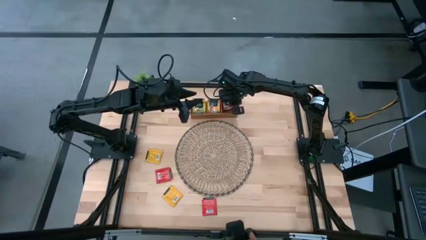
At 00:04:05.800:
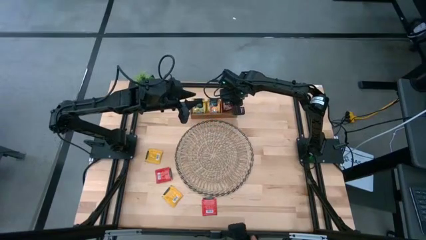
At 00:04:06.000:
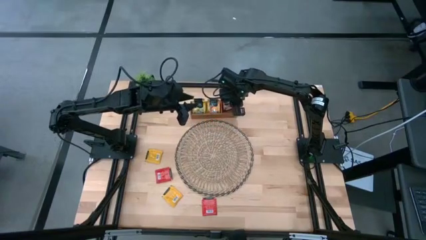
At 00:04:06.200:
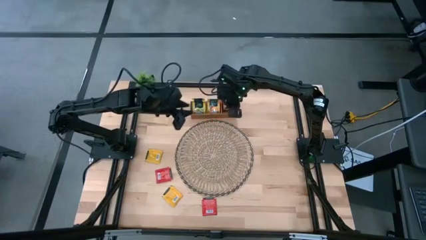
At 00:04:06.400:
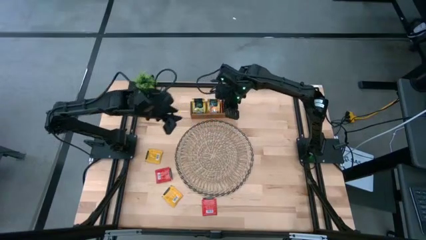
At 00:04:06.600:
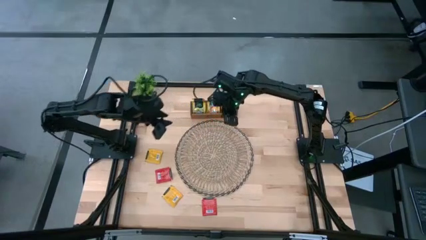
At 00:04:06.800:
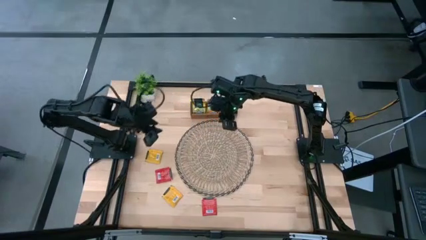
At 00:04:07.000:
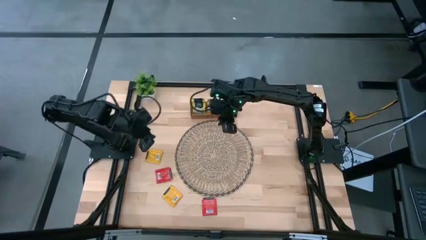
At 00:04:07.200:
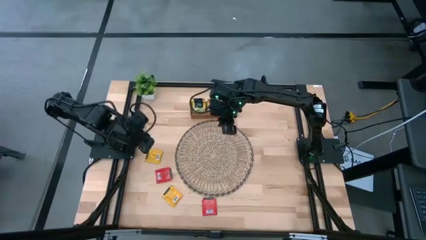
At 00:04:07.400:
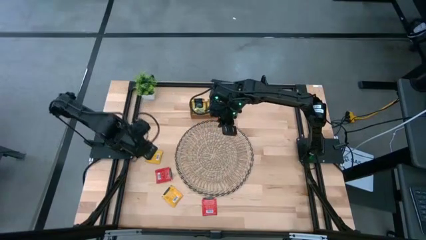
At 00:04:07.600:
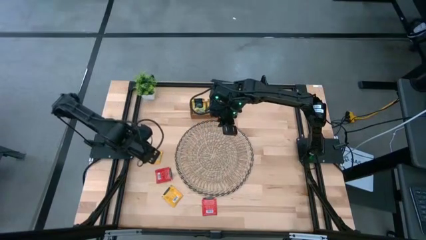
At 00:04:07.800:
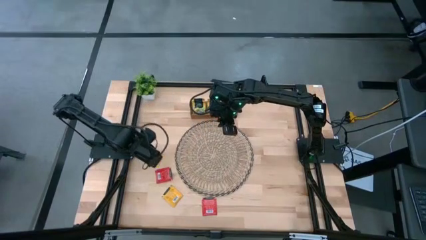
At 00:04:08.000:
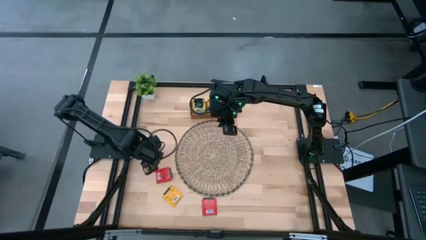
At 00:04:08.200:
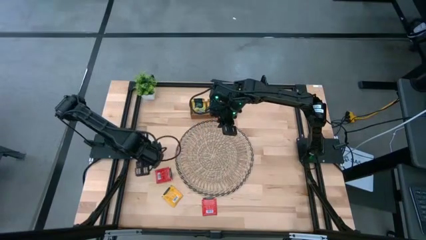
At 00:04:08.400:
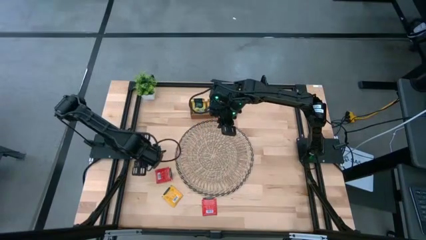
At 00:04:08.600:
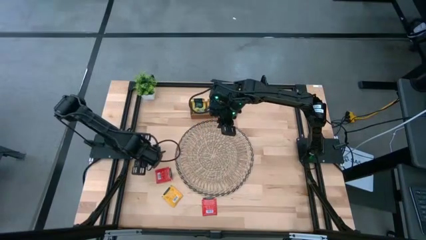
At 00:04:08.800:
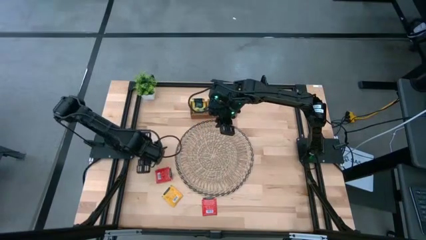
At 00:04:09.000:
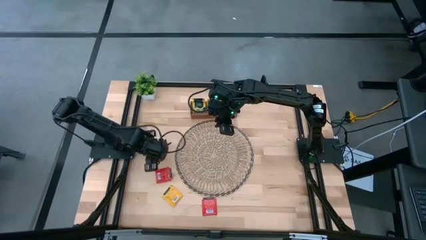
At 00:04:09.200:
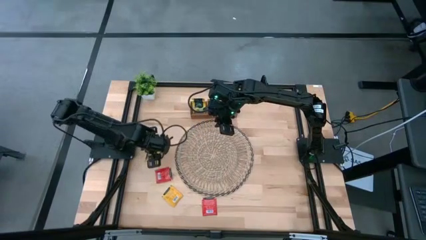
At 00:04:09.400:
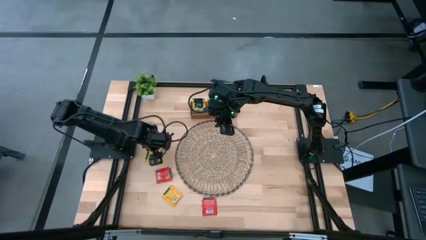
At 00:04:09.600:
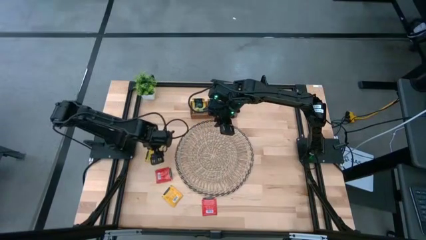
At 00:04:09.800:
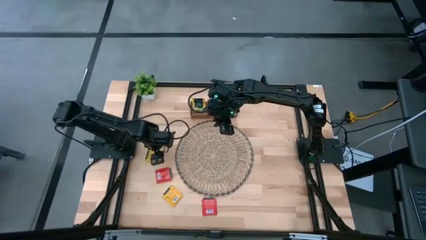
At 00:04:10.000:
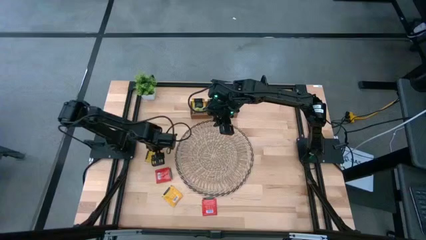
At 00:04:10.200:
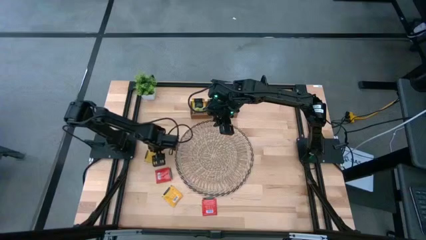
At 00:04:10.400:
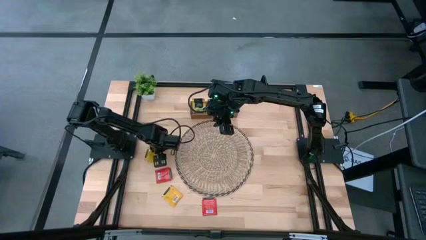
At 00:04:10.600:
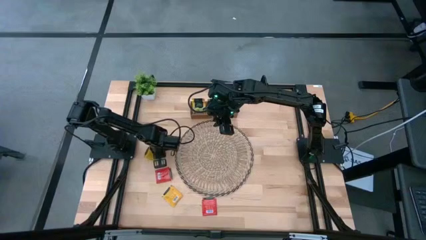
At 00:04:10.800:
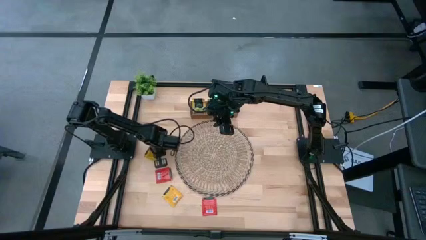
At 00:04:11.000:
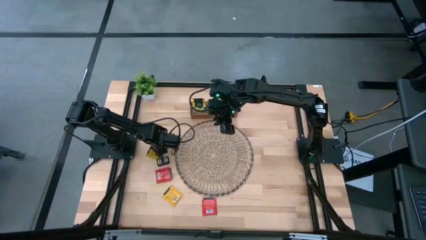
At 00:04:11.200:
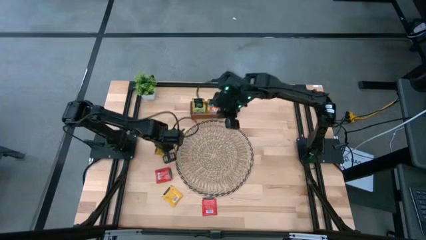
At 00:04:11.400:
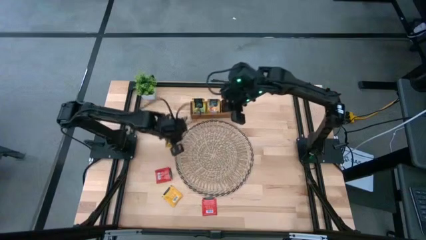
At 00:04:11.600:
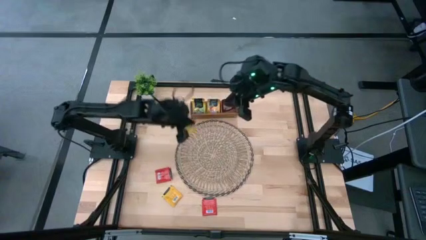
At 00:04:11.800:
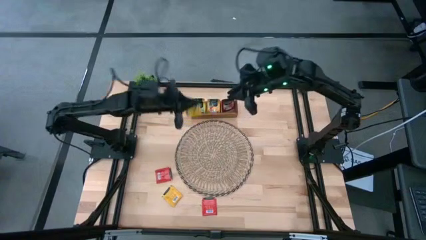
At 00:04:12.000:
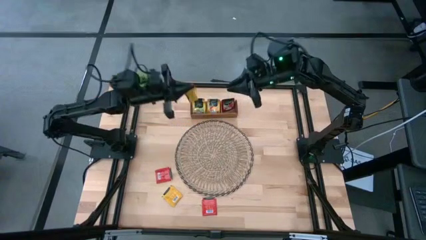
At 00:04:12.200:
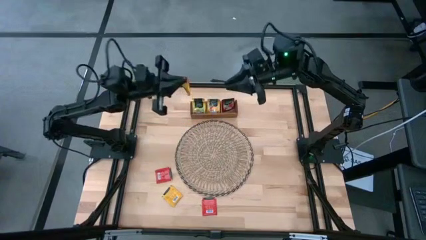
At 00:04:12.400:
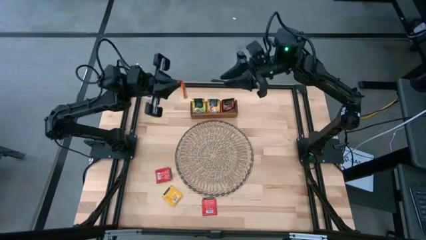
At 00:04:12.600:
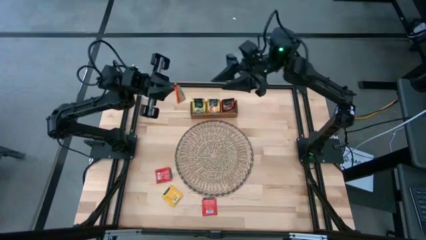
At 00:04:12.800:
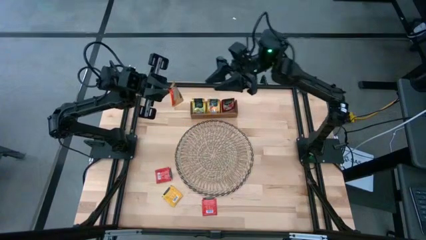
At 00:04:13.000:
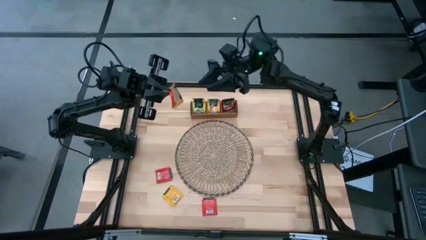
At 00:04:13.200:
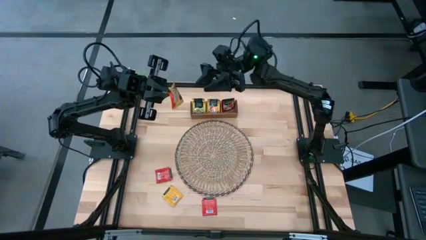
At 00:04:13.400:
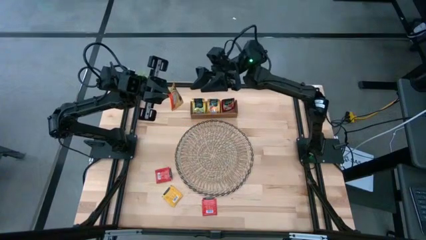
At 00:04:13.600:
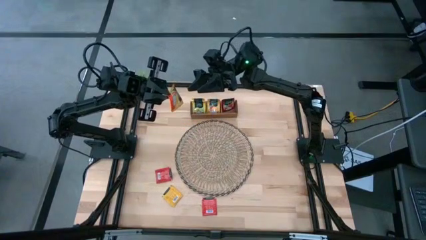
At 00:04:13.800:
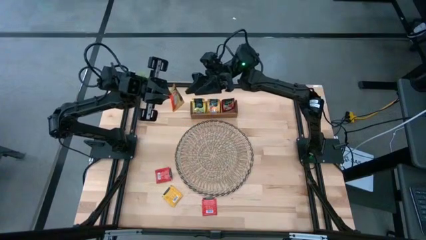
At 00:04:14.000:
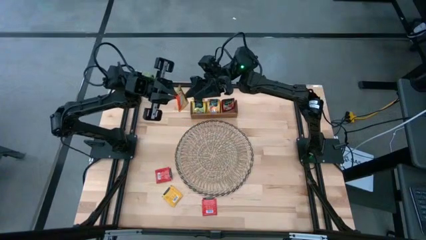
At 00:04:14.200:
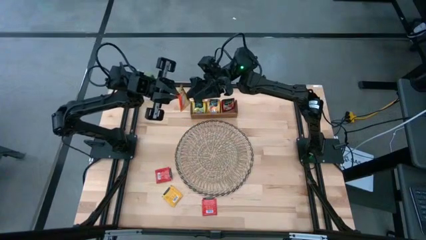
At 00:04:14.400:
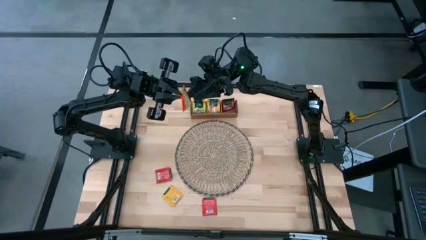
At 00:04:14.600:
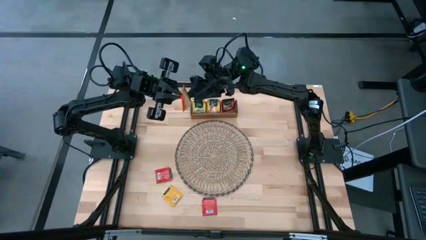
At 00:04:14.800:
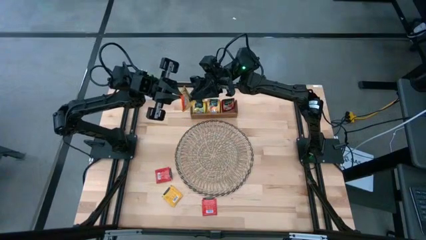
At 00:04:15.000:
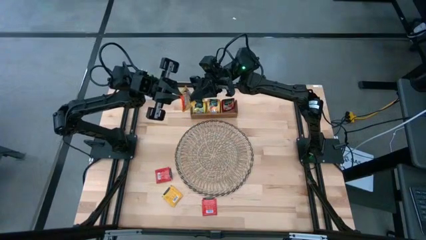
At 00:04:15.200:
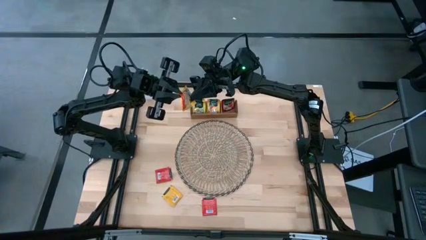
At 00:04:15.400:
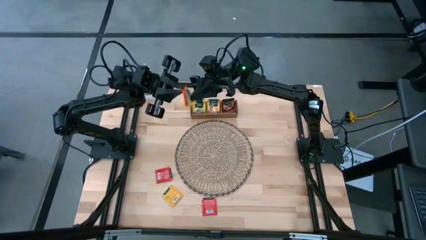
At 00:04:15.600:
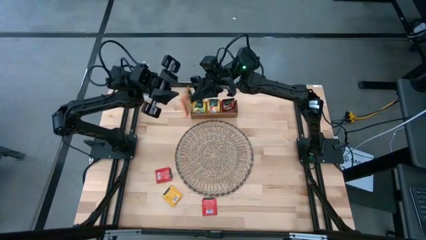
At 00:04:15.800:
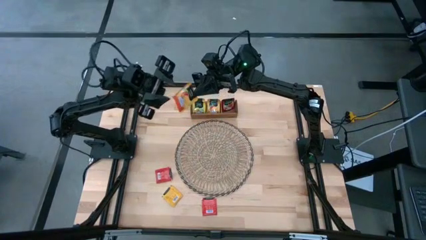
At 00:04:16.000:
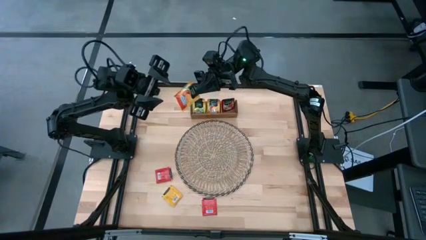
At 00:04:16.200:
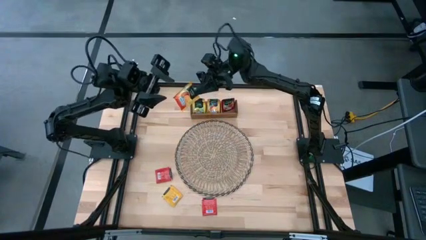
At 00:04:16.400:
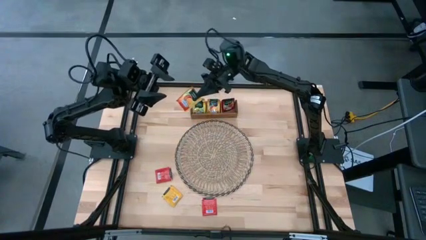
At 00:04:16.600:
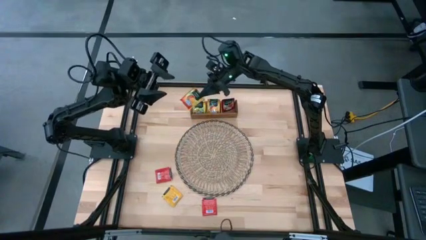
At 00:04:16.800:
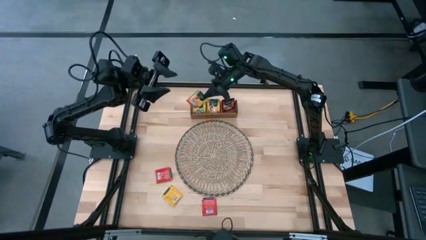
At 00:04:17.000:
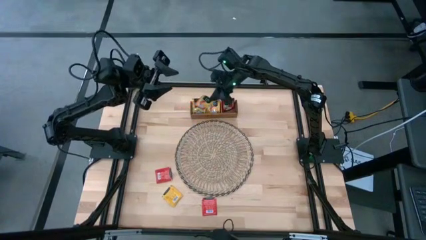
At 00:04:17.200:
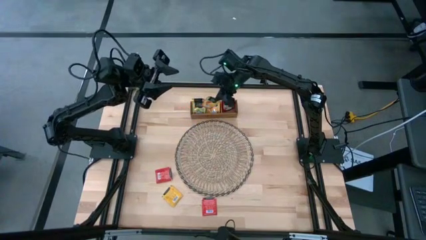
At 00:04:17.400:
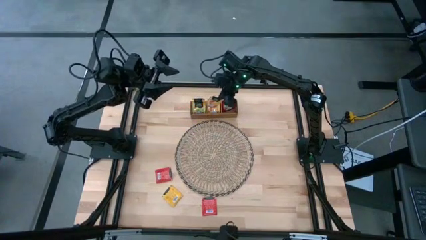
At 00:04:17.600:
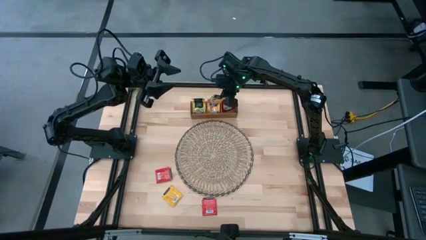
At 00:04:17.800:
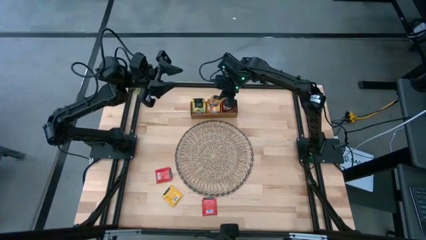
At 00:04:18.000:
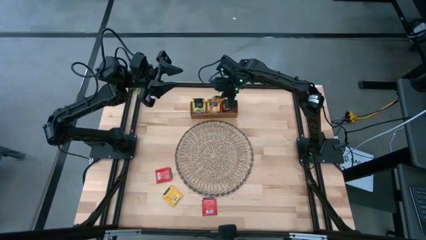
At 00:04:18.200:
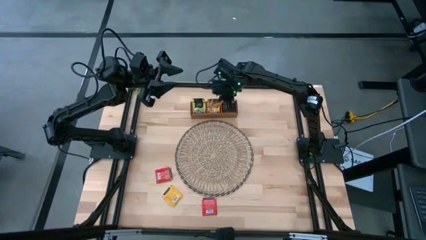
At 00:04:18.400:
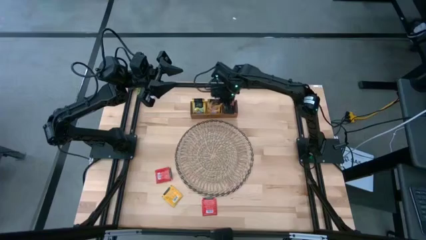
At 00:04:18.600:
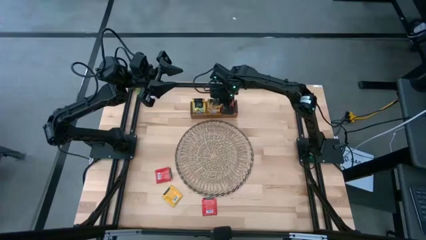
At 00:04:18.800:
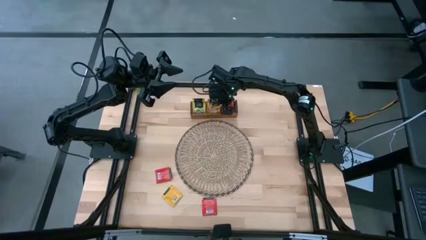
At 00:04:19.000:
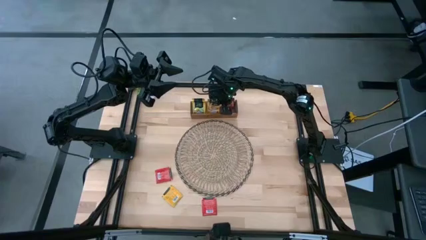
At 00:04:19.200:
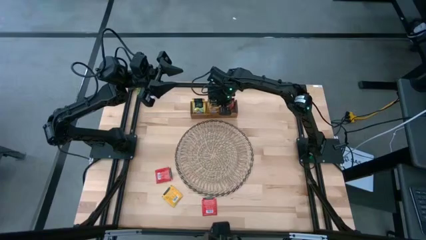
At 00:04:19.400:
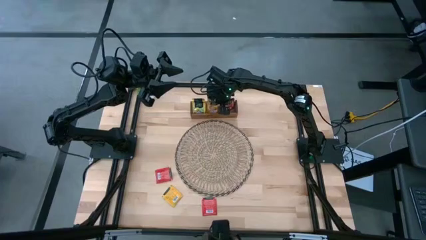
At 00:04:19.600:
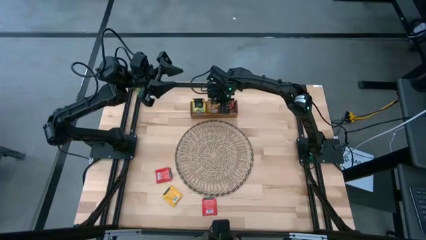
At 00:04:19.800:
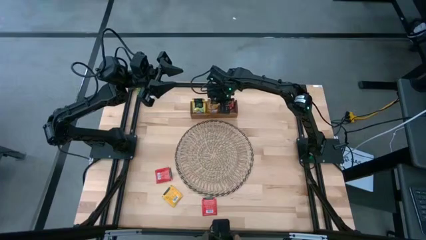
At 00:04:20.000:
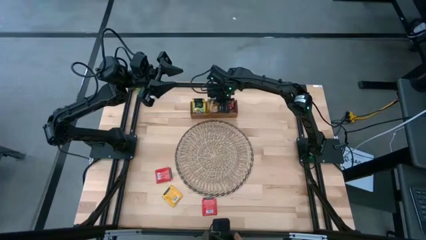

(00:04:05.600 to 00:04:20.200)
Task: Pick & Place Tea
Put the top orange tea bag into the middle of the wooden organizer
